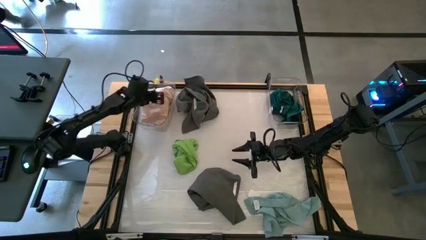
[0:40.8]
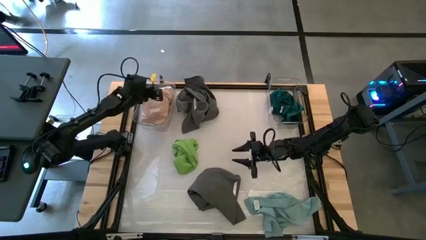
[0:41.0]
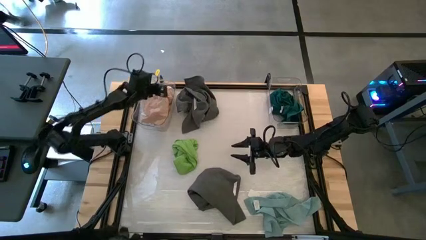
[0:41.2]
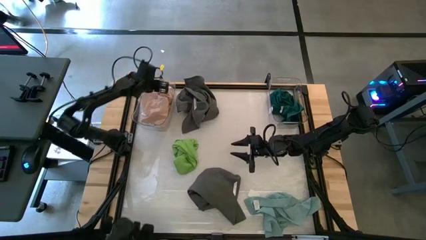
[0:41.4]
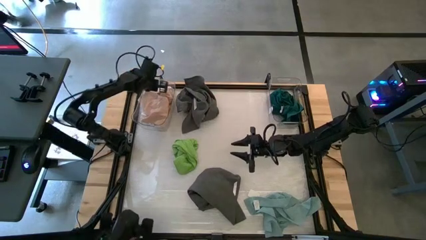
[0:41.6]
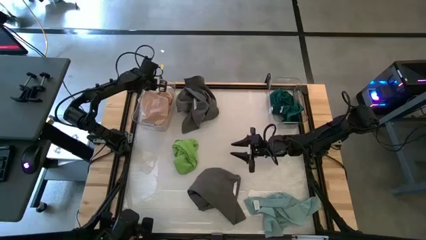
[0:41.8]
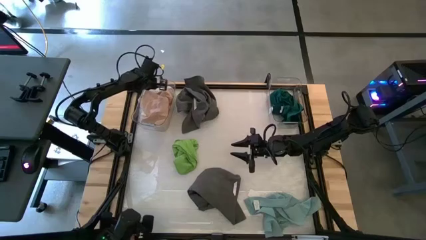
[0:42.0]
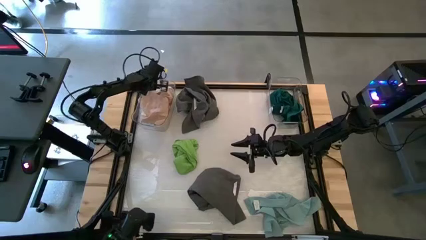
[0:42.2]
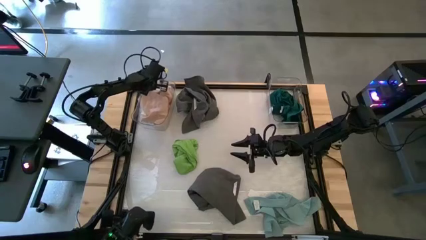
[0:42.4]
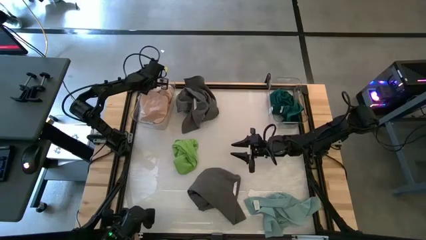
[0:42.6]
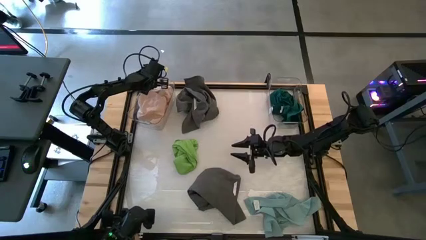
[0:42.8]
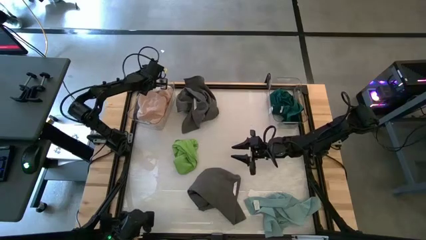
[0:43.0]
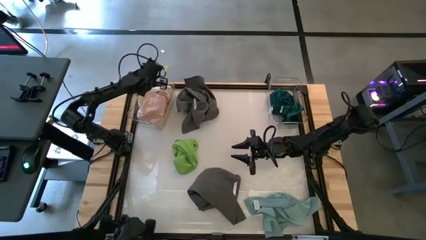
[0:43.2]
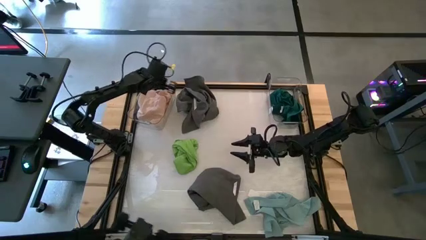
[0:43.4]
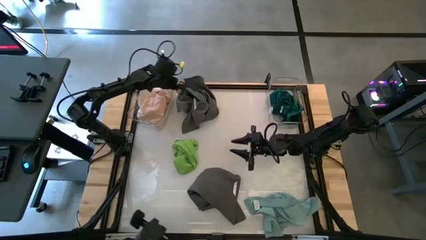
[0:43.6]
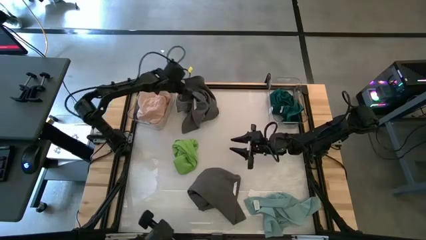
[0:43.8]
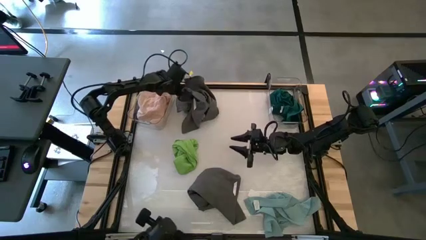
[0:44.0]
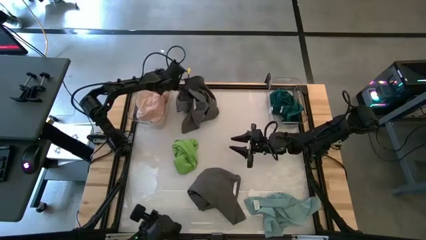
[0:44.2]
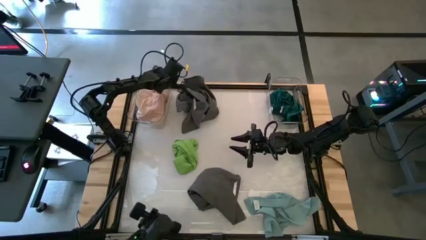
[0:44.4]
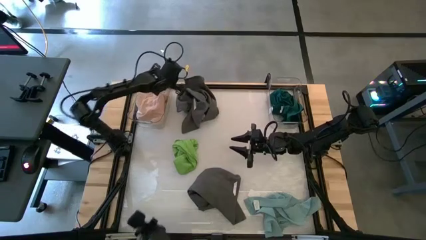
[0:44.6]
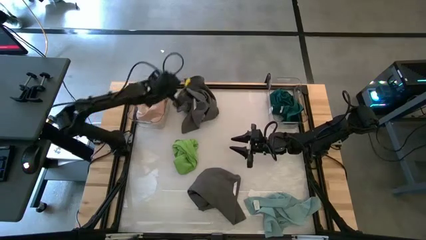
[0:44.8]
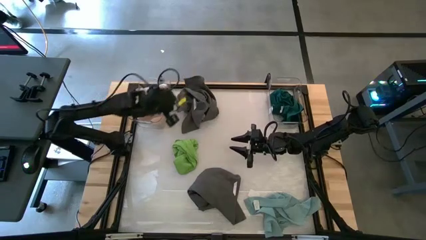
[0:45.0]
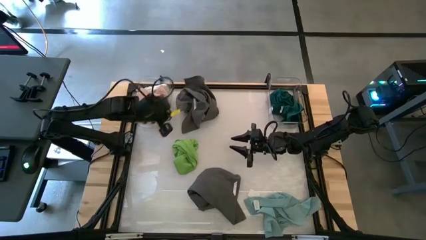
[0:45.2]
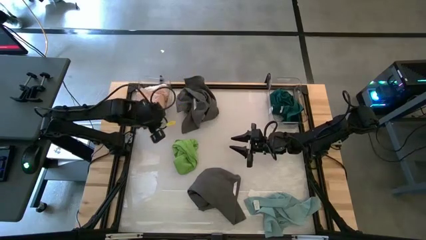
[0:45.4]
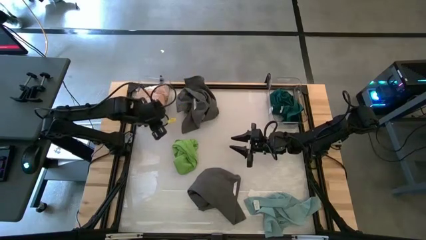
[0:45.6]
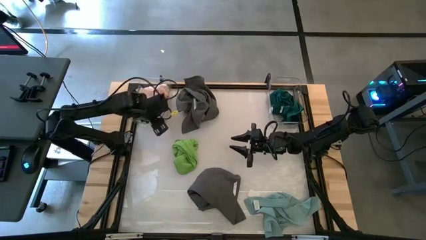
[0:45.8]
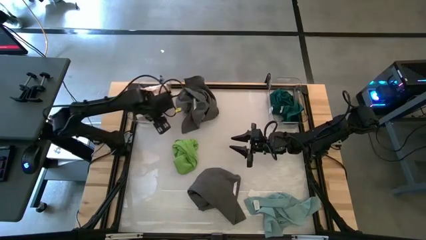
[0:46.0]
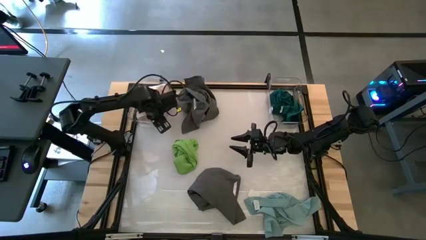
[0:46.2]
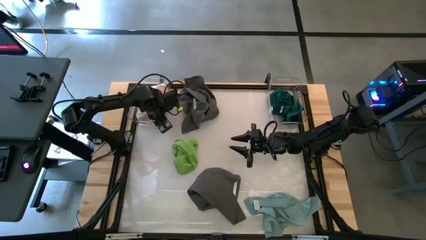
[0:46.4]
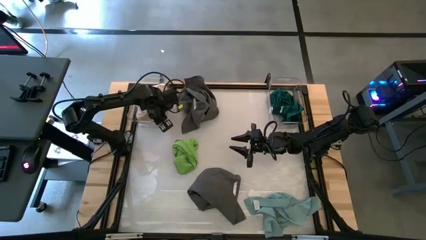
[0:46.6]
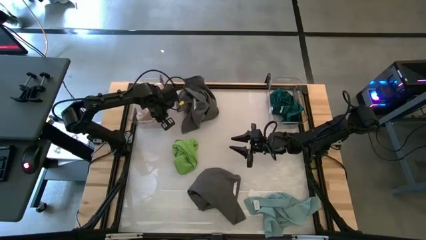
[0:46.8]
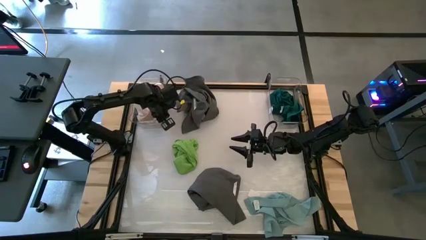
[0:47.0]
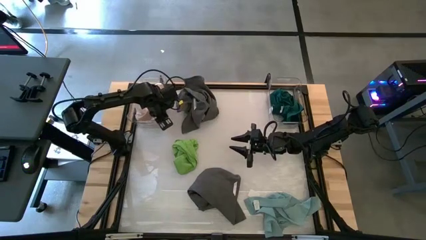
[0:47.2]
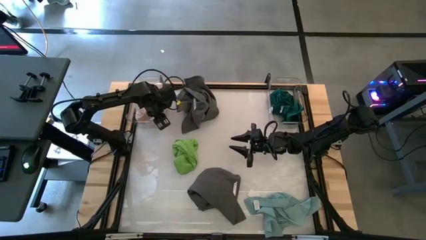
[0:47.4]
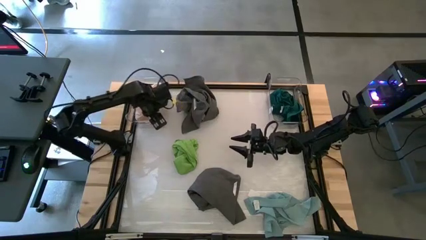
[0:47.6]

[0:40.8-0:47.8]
Task: Sort towels by color in basket
Adjust the left transparent bin

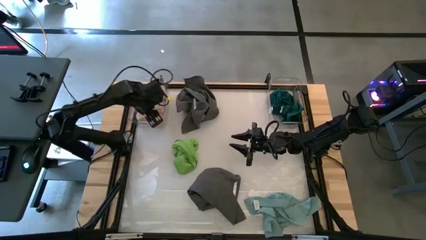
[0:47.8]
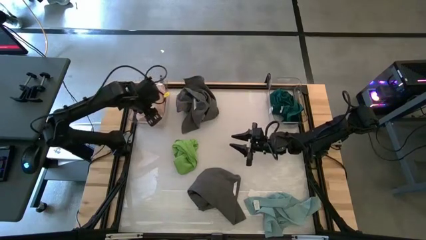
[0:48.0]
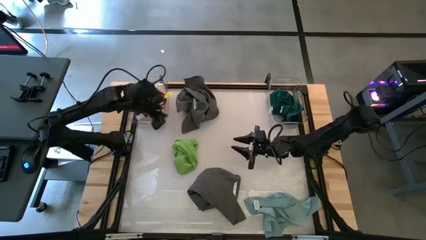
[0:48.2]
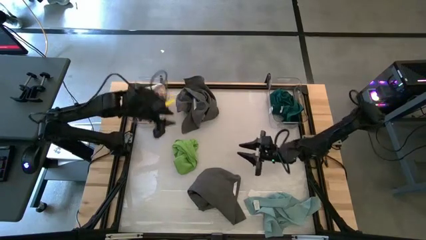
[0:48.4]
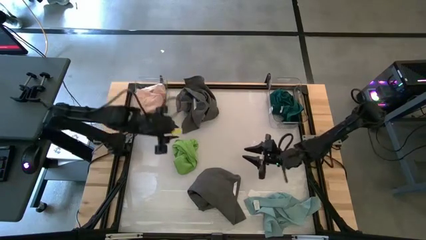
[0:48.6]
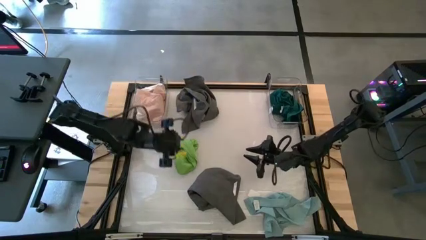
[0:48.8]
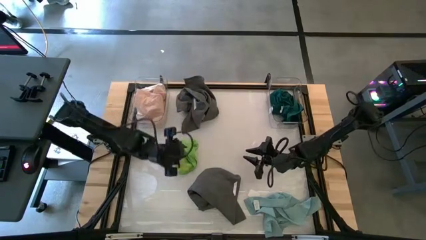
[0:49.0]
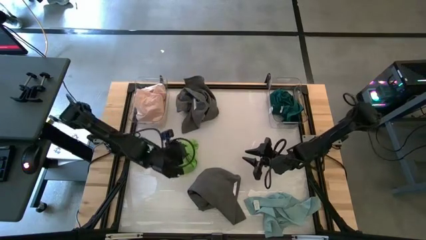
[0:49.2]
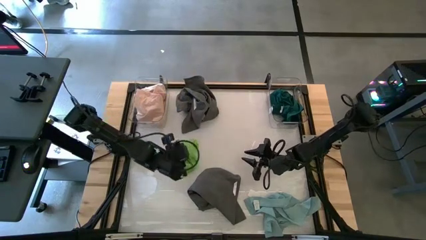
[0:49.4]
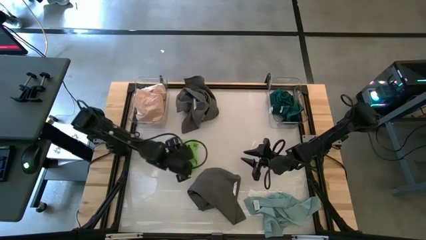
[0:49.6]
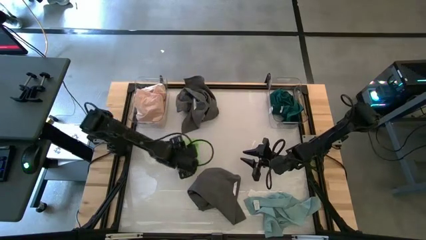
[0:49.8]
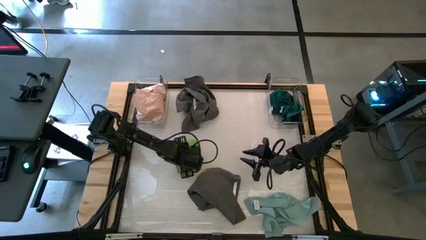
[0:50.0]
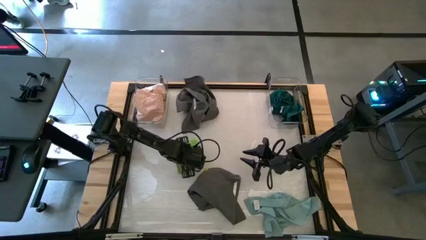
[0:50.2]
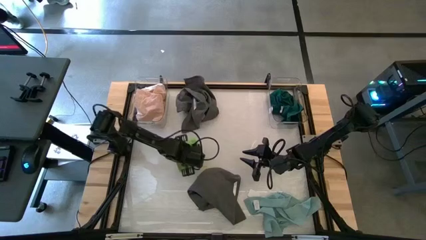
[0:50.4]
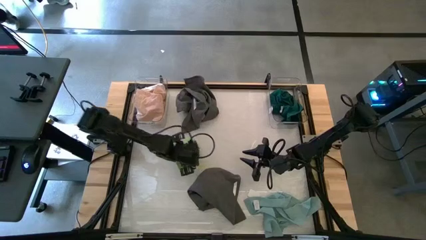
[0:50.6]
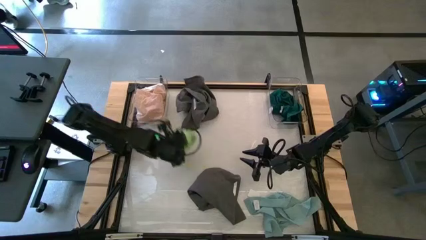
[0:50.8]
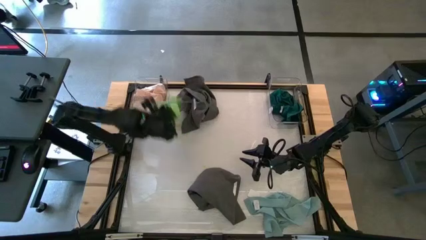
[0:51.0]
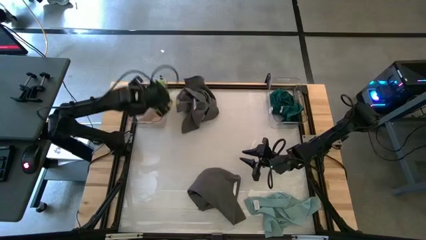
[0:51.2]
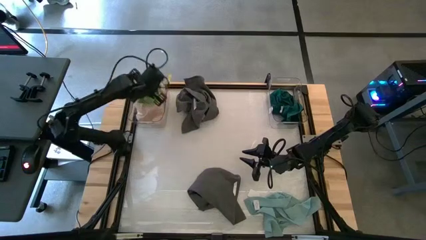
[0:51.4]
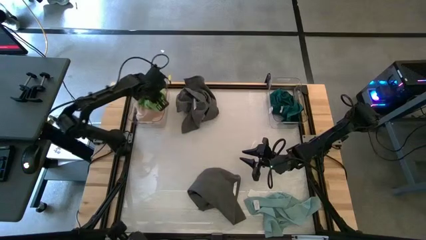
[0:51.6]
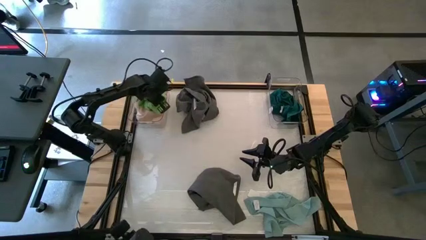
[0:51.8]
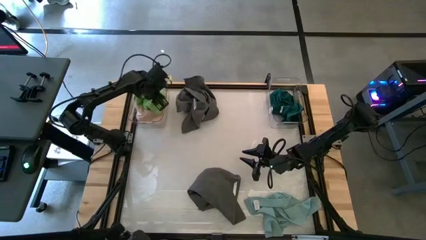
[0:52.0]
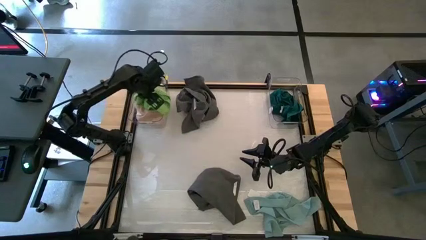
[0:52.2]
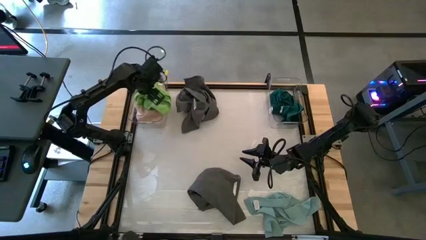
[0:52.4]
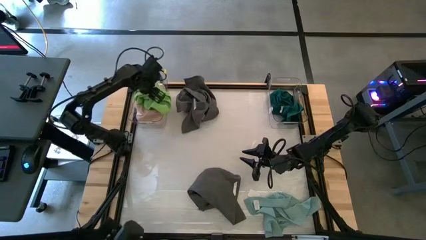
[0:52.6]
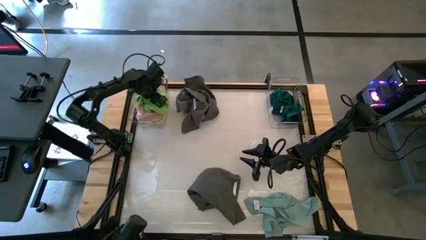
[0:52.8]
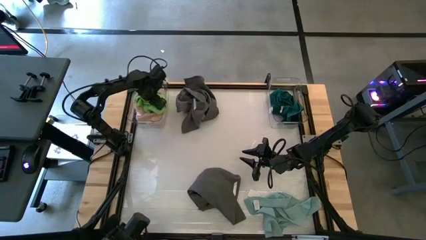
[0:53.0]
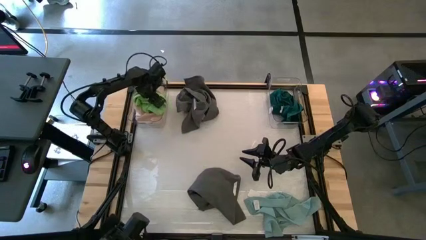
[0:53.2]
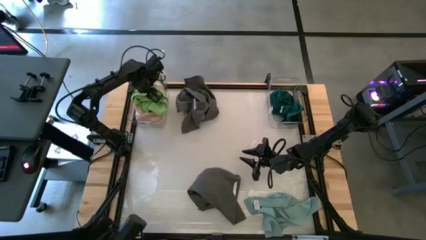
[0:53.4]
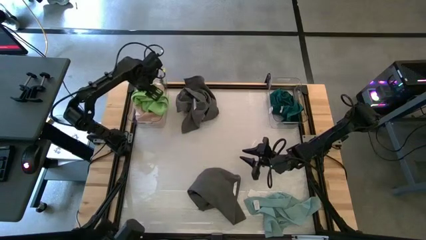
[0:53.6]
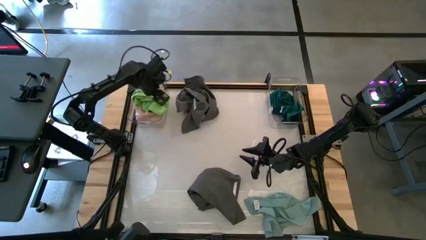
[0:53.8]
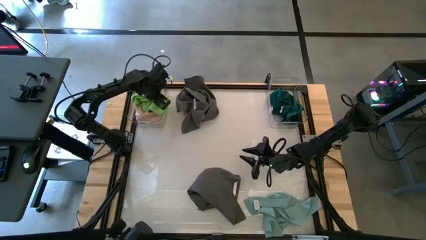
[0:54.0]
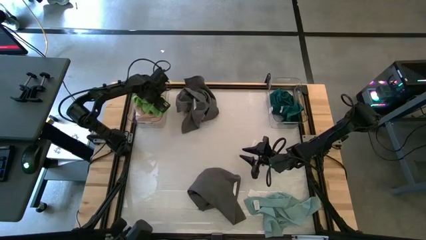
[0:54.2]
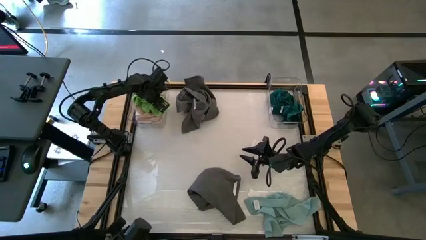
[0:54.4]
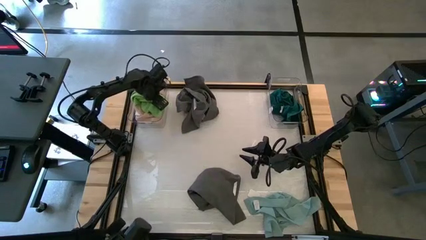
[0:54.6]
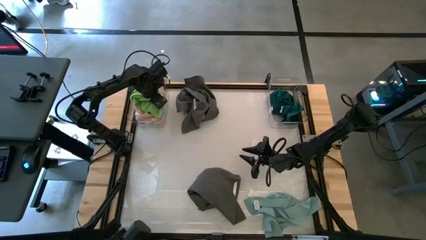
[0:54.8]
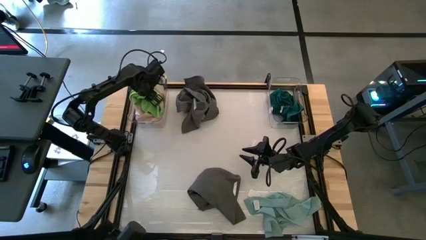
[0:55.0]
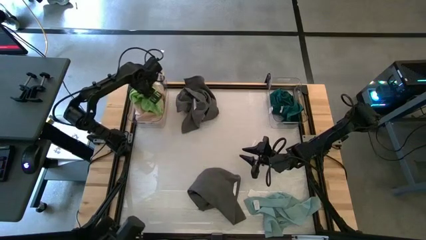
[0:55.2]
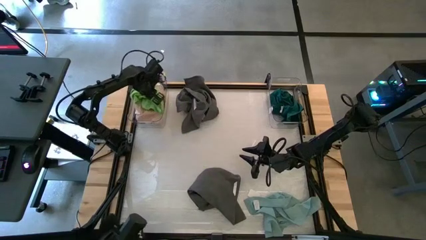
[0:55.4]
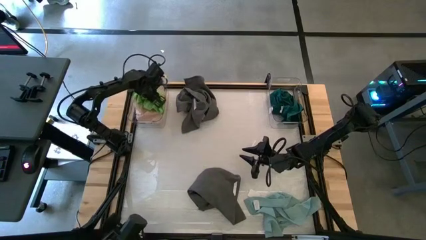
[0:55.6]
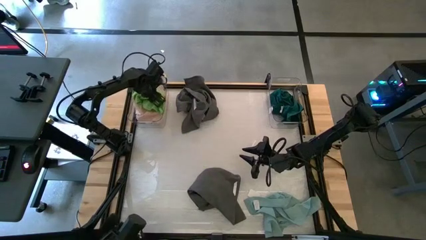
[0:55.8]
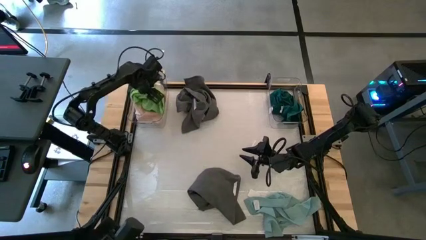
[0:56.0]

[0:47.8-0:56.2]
Put the green towel into the left transparent bin

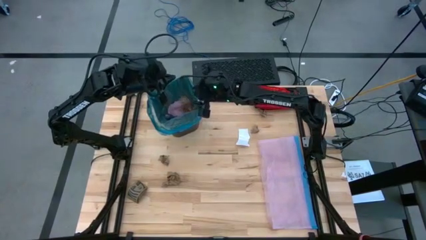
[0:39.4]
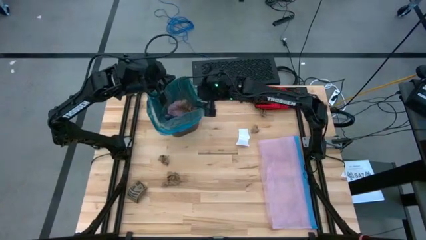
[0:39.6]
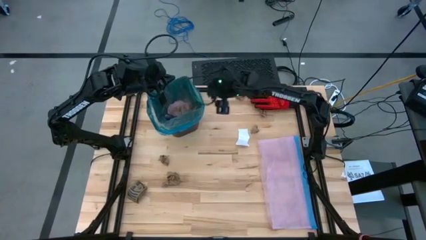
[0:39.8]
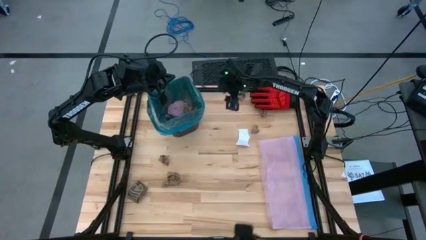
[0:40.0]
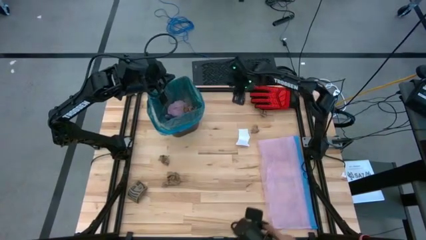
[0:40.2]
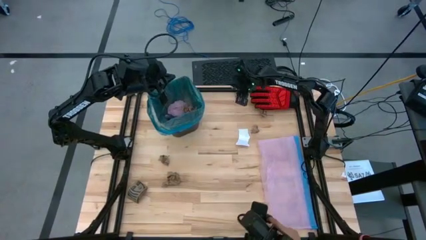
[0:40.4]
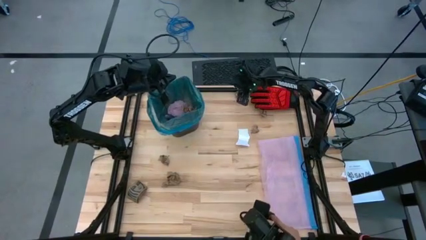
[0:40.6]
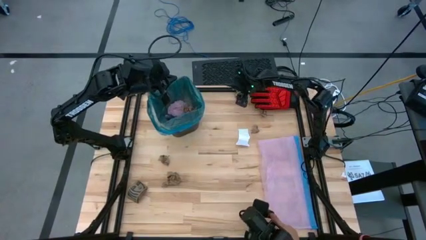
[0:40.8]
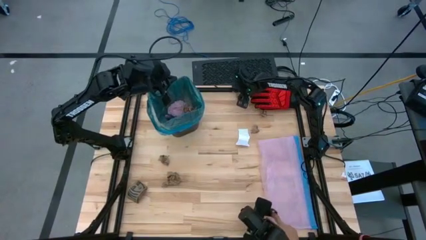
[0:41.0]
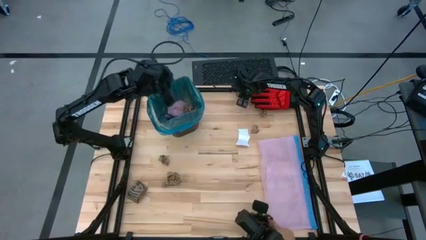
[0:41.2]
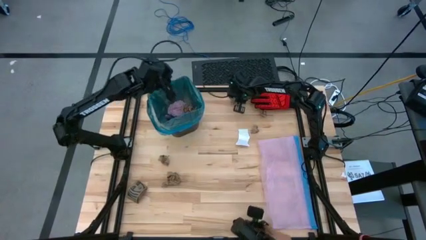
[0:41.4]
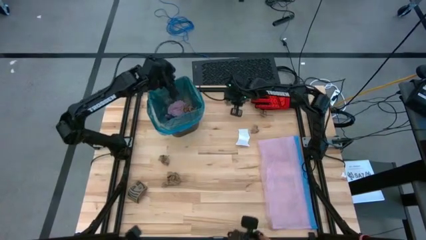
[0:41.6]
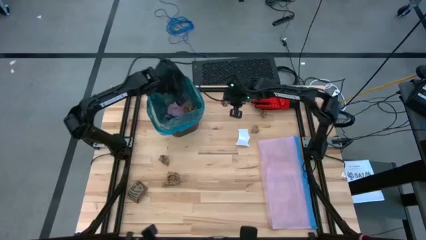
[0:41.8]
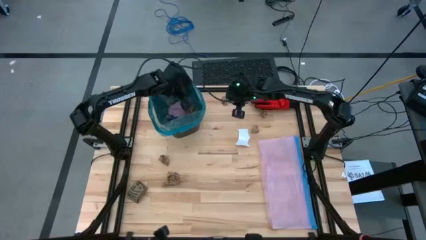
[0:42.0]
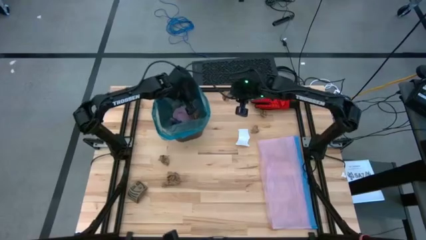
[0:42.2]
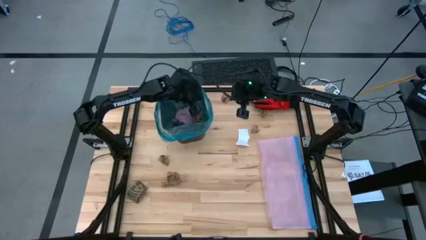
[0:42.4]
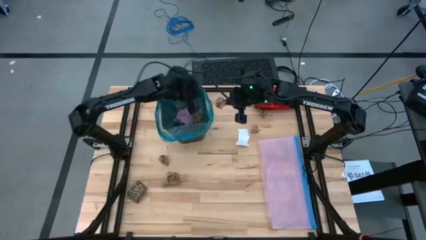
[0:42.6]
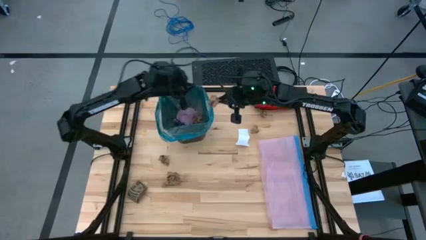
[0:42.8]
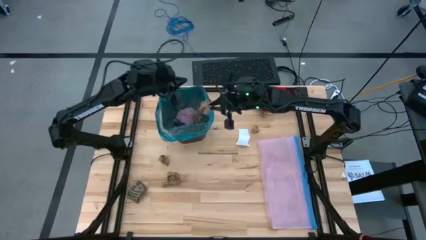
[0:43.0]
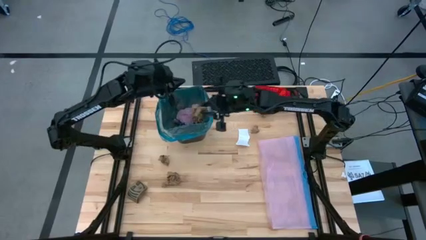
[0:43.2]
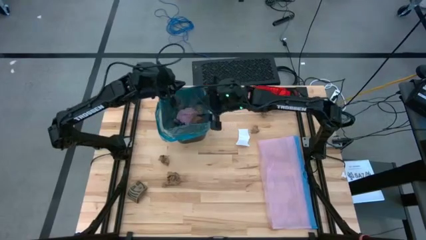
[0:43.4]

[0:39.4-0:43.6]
Task: place trash/remove bag and relplace
Put the brown napkin into the black trash bin
